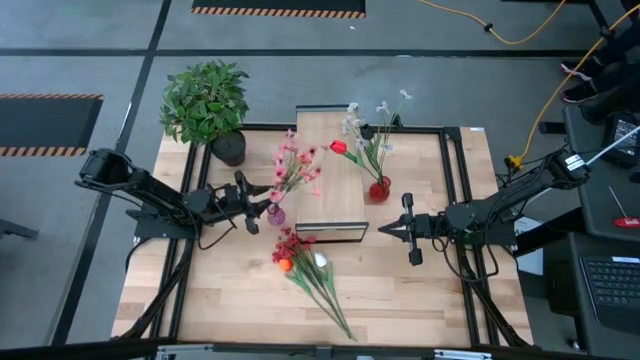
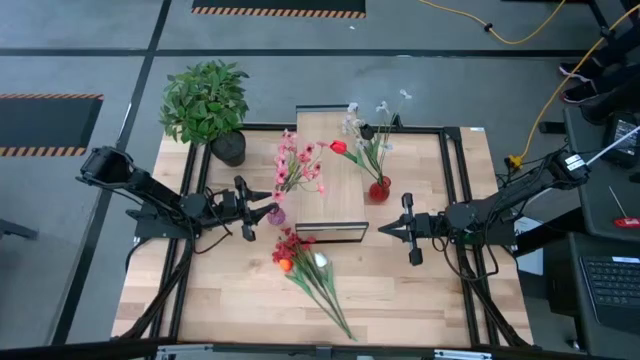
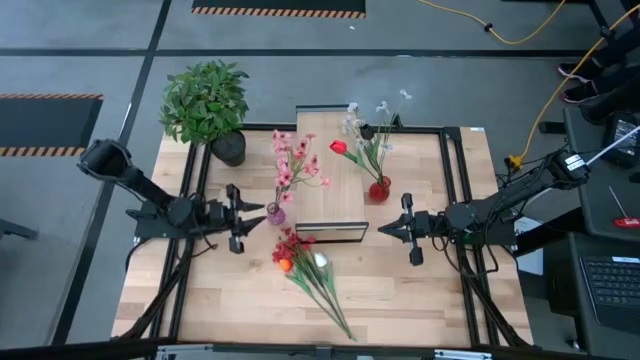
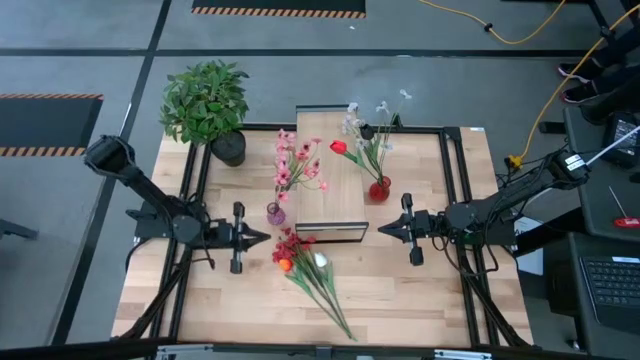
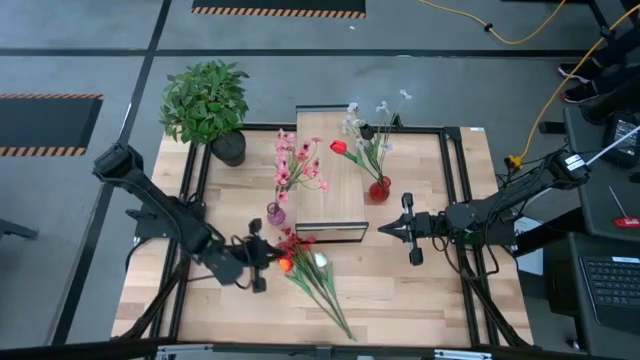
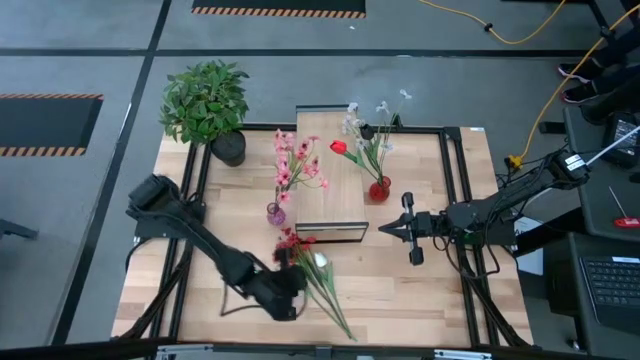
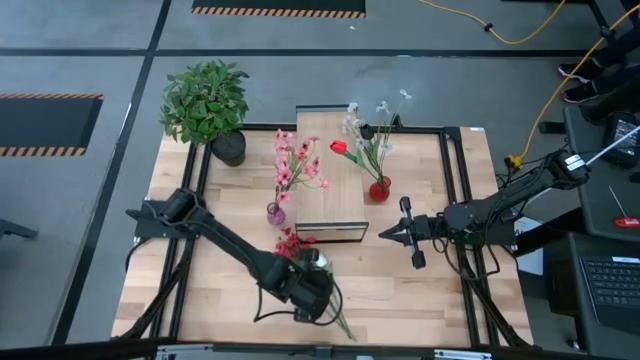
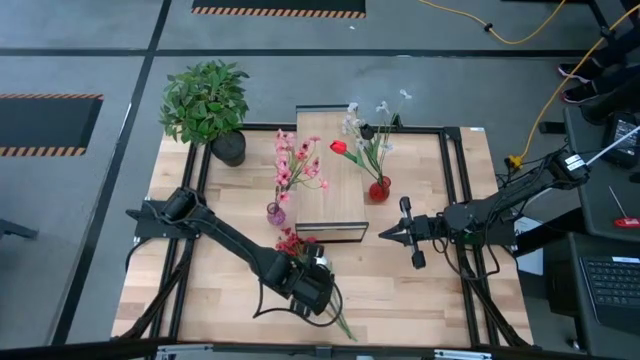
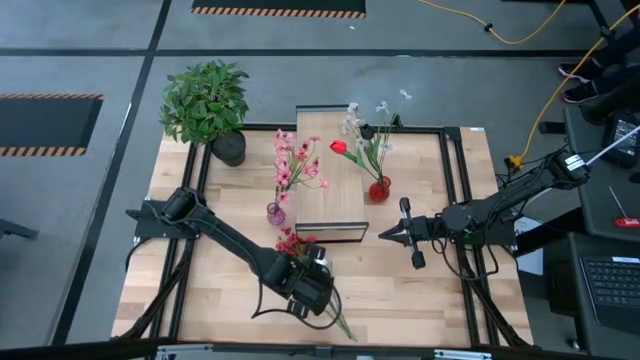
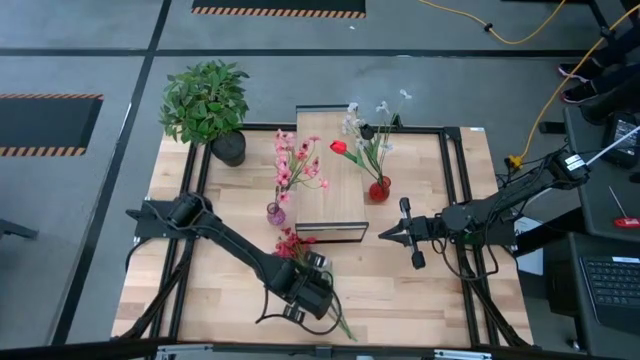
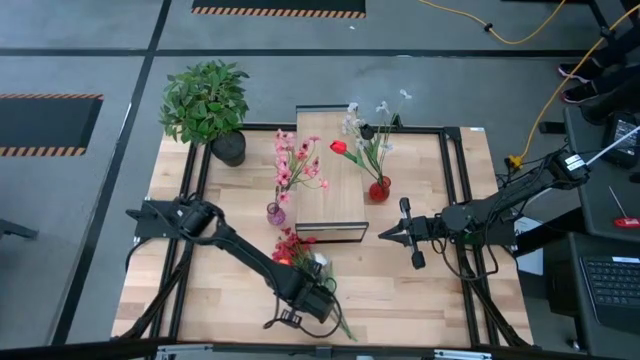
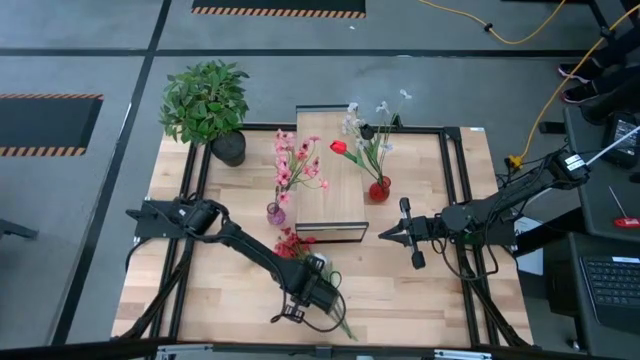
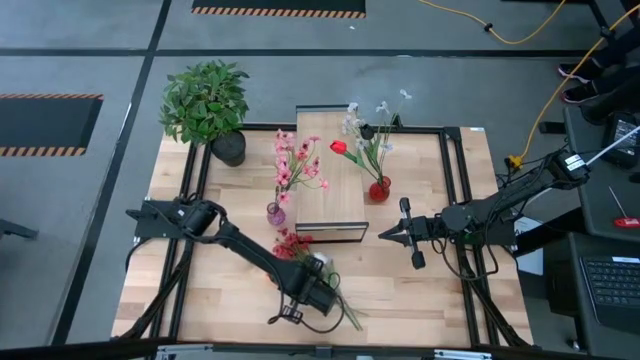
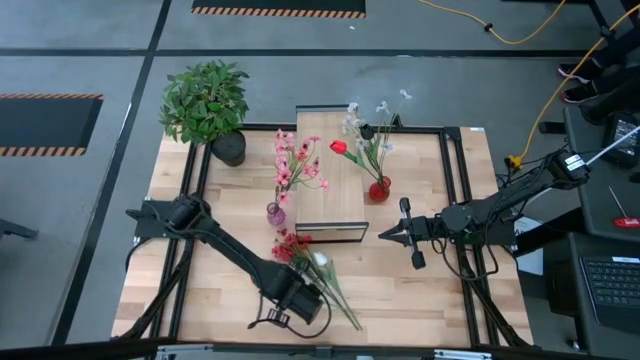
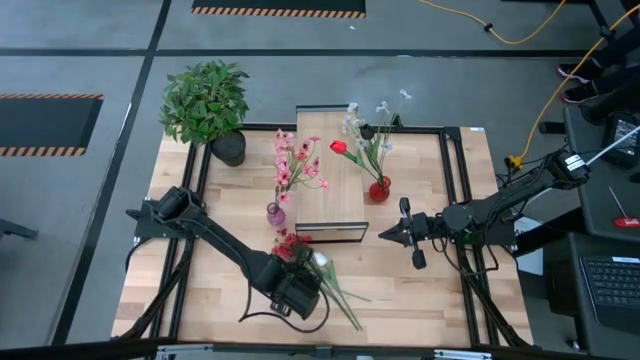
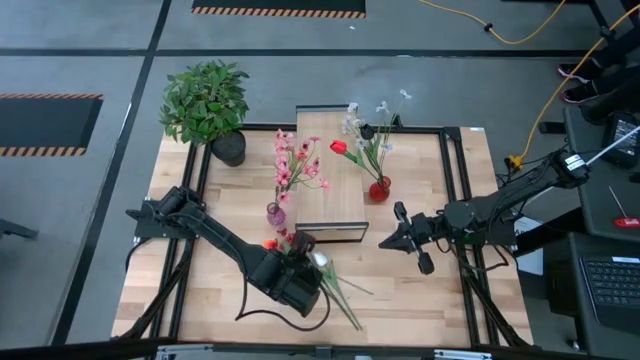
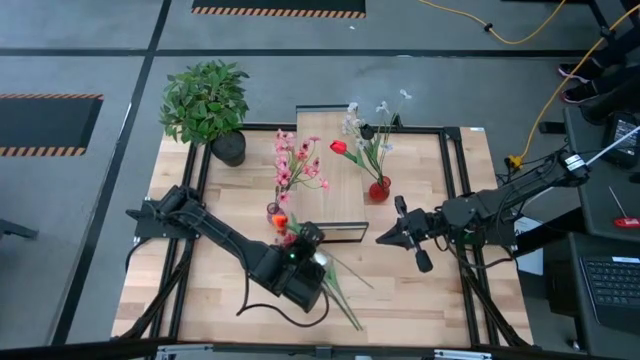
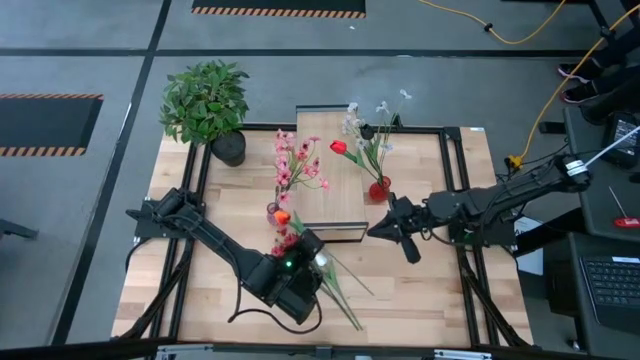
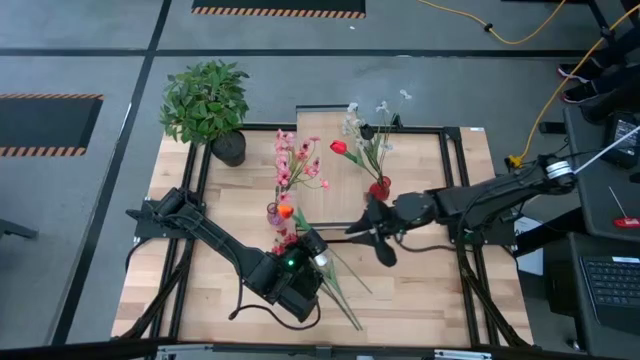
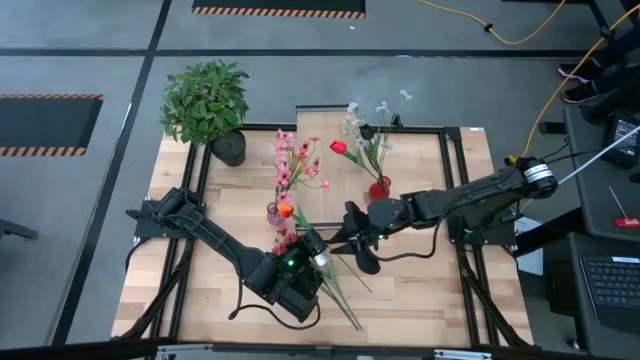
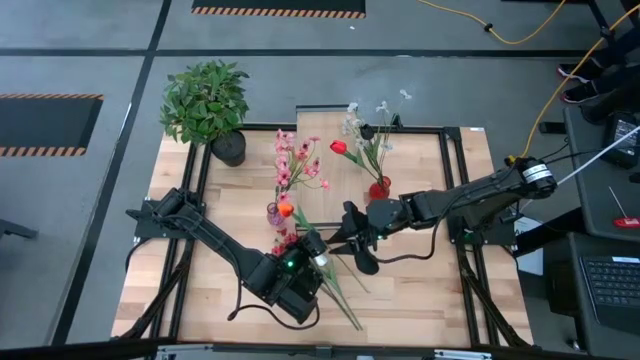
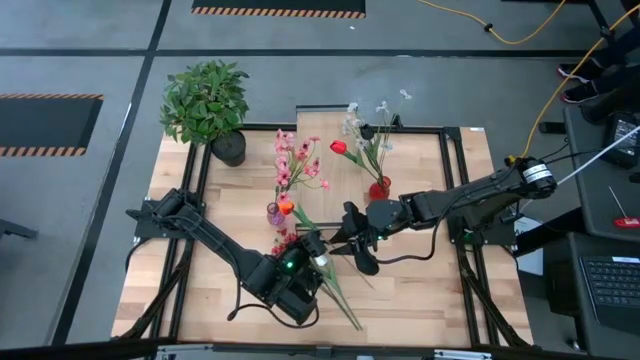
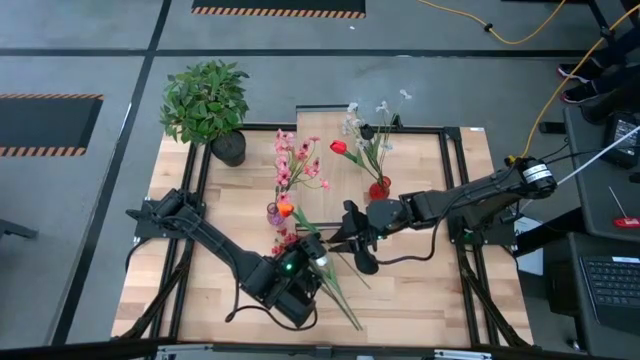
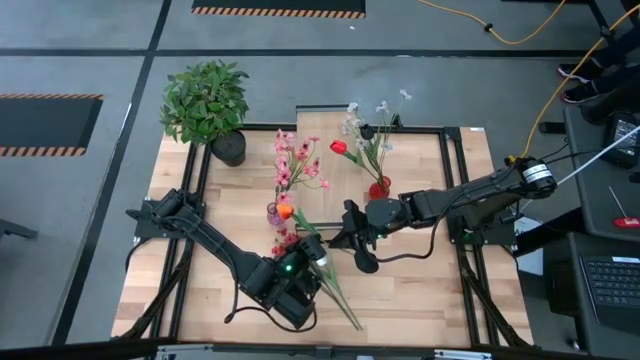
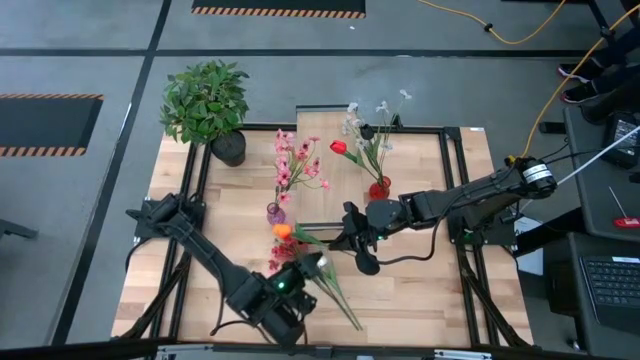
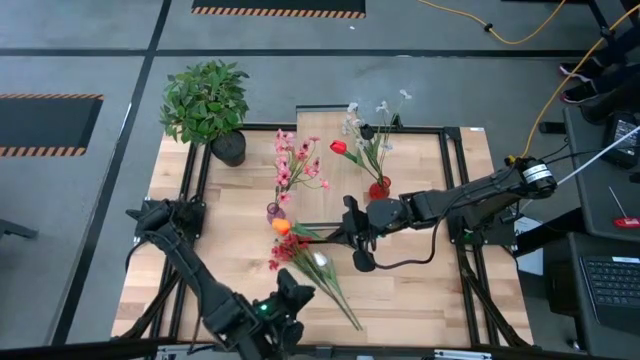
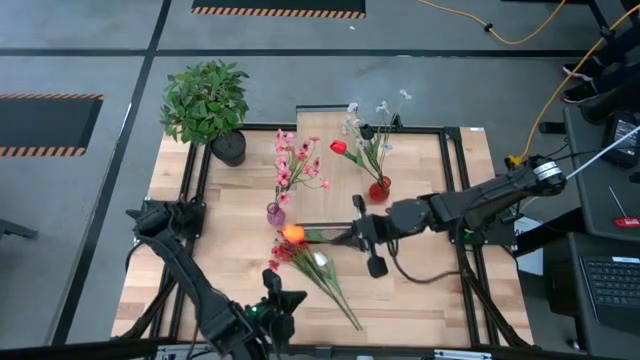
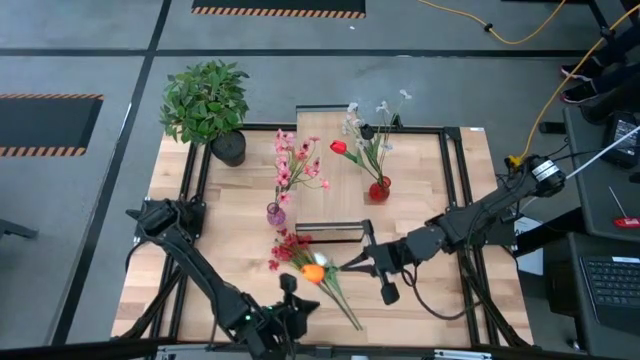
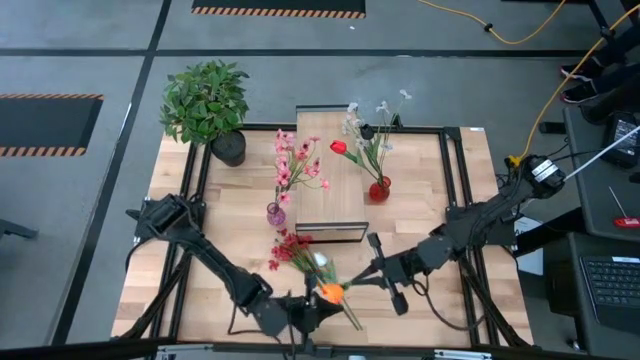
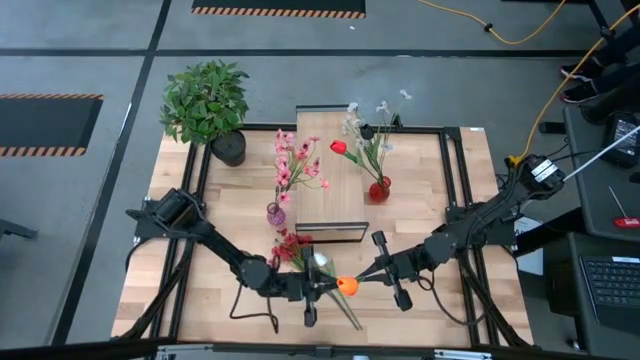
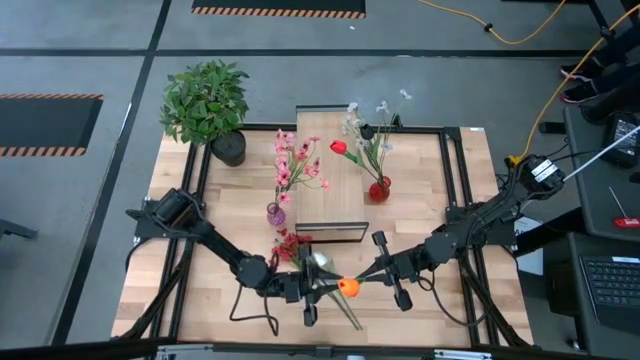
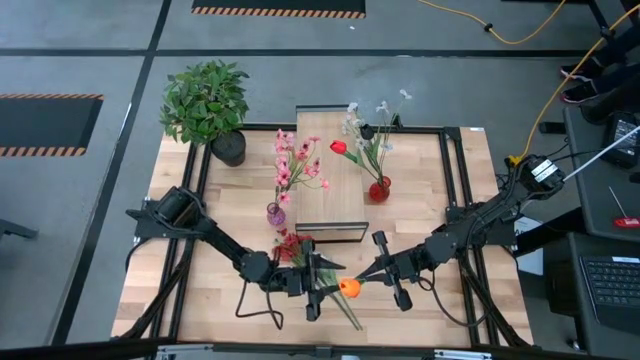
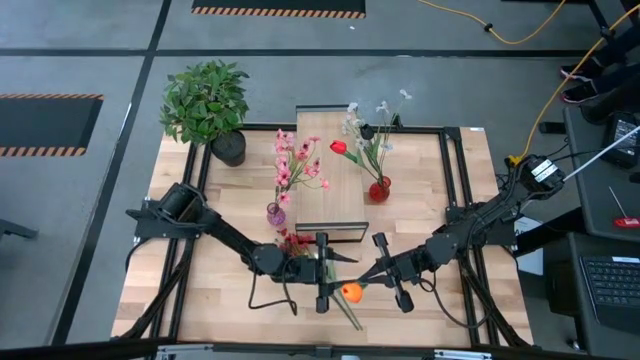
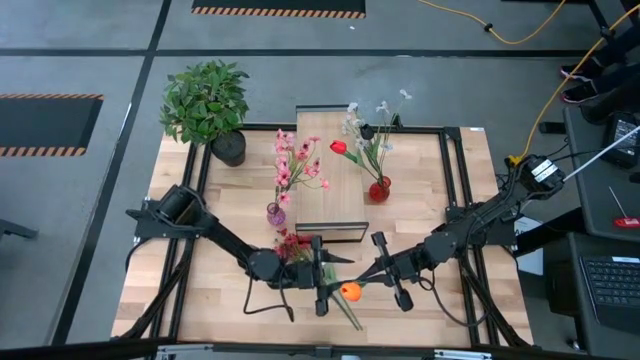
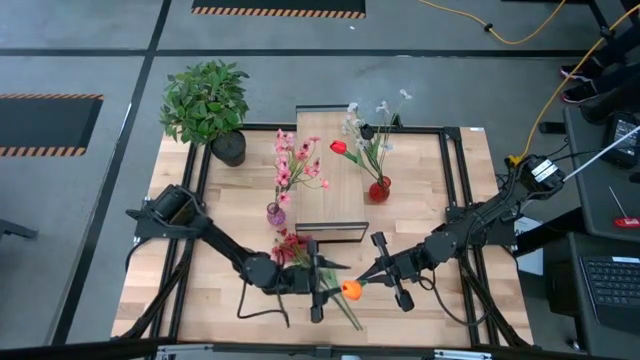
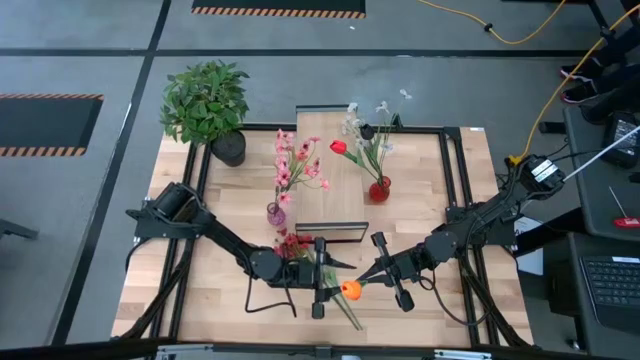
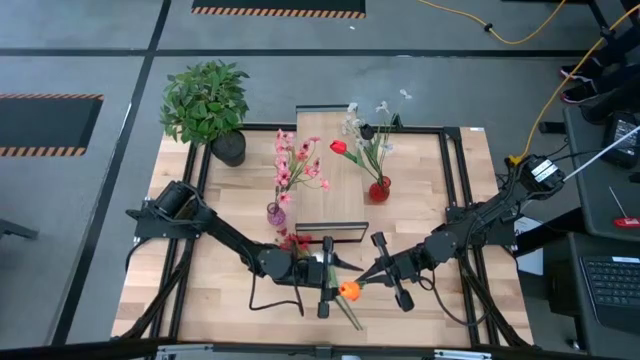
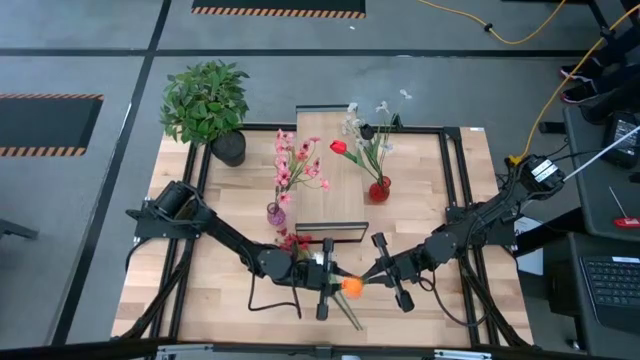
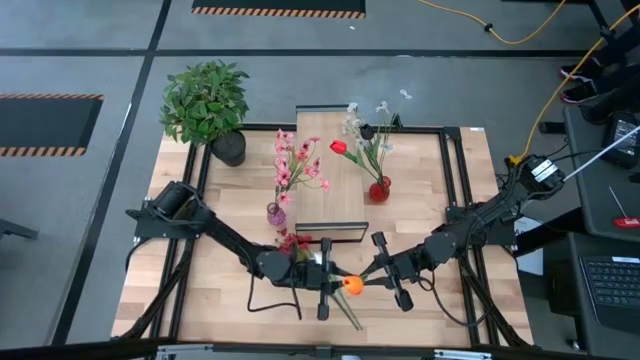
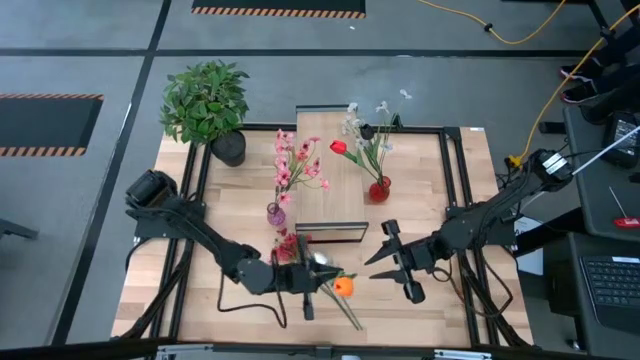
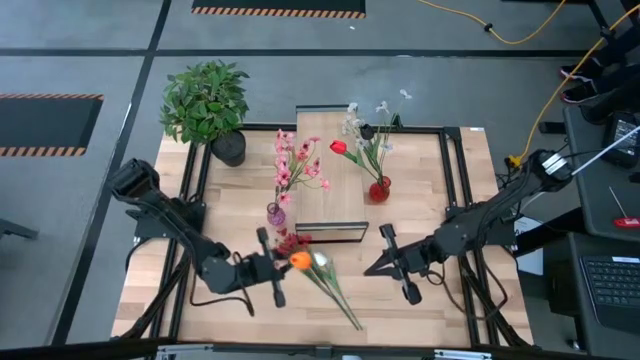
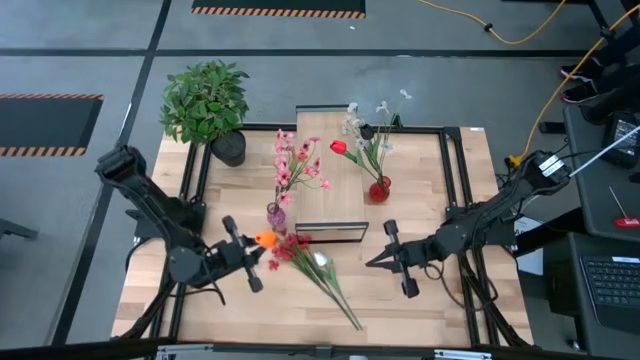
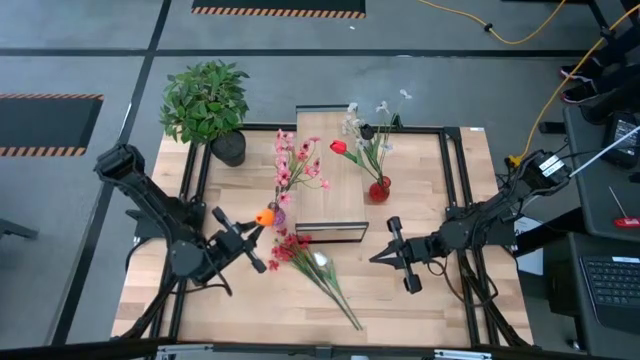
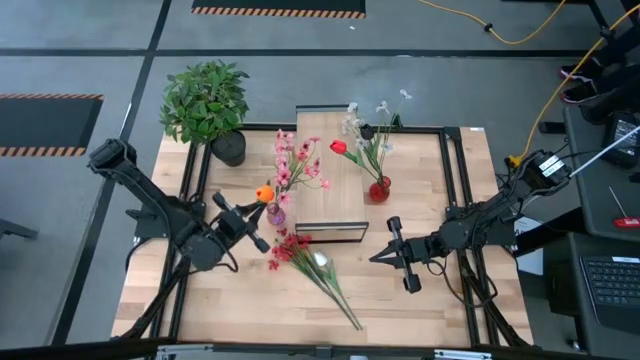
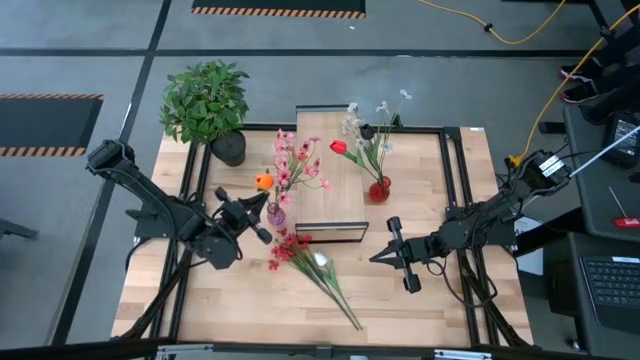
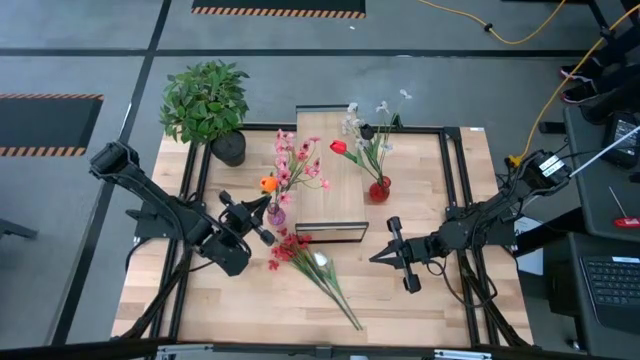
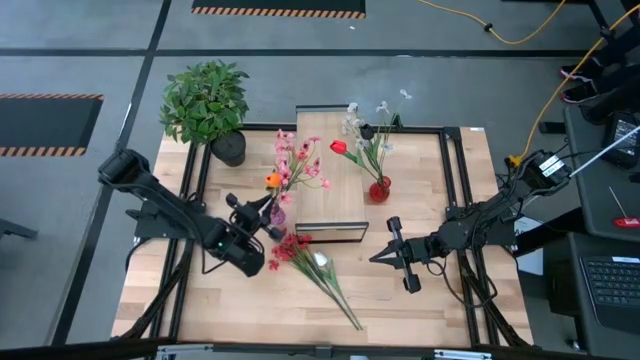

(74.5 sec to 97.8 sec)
Task: Pick and place flowers into a vace then onto a shelf
Put the orange tulip into the violet vase
